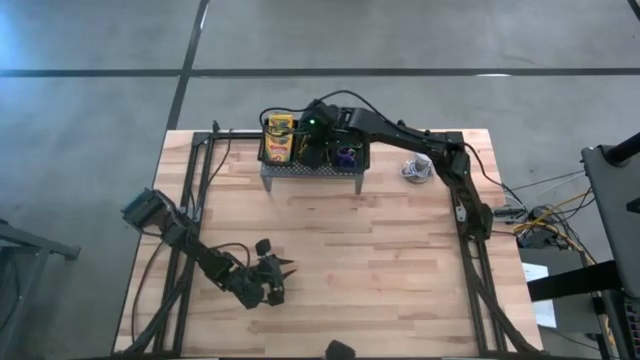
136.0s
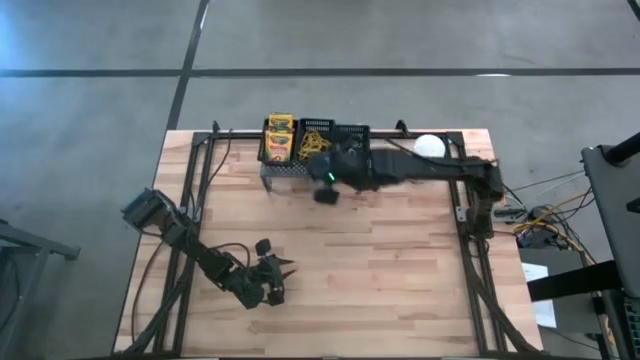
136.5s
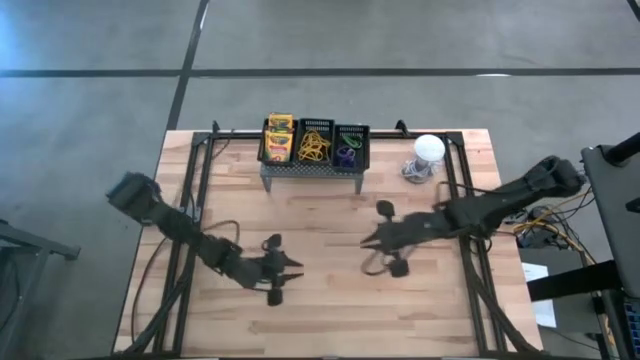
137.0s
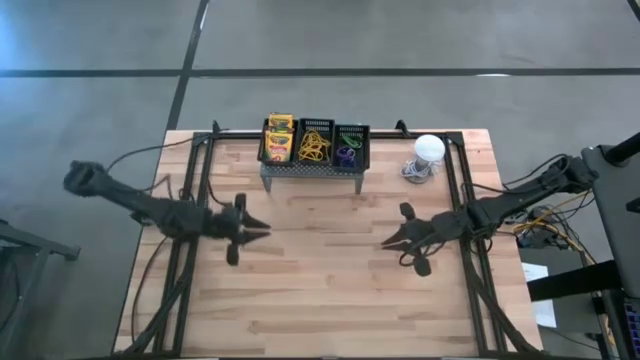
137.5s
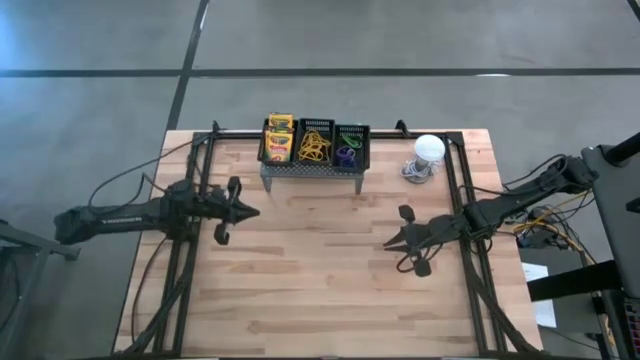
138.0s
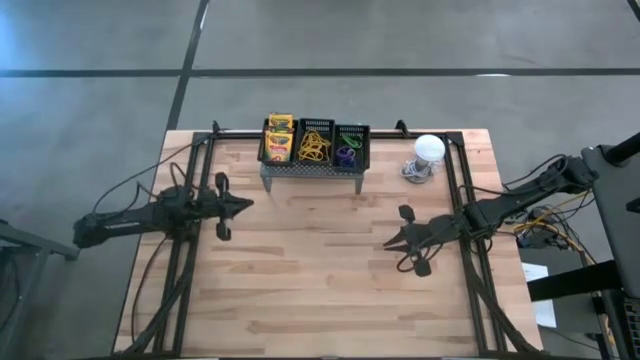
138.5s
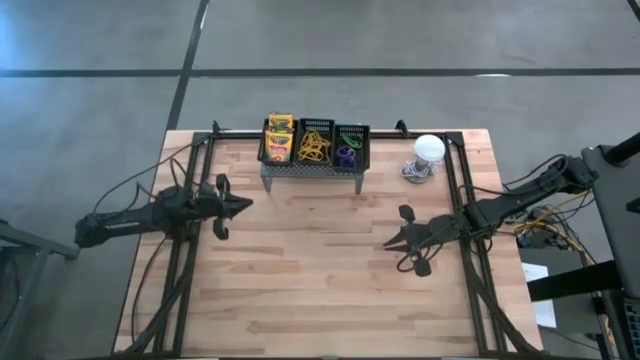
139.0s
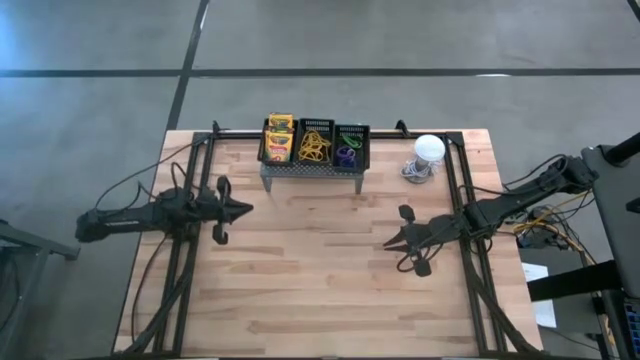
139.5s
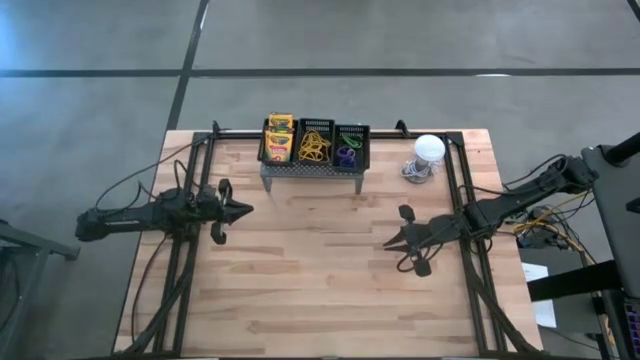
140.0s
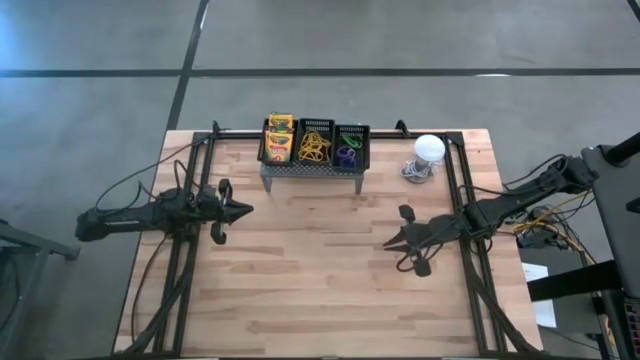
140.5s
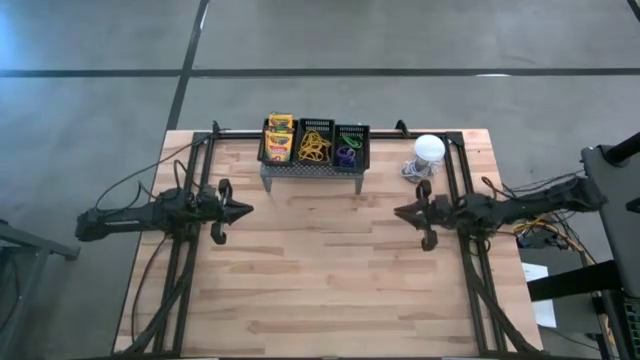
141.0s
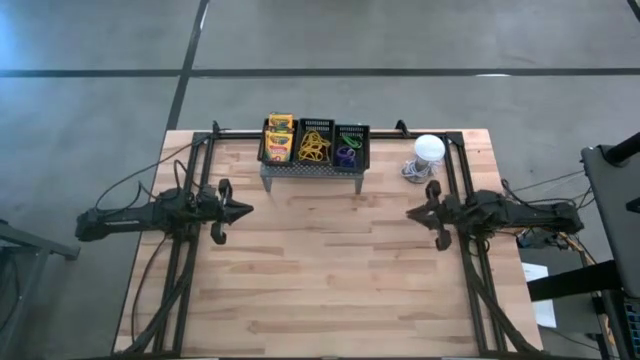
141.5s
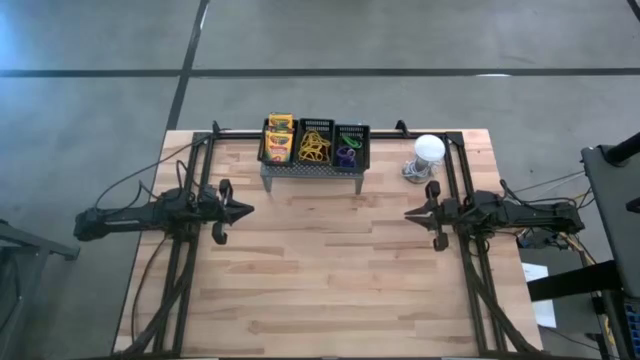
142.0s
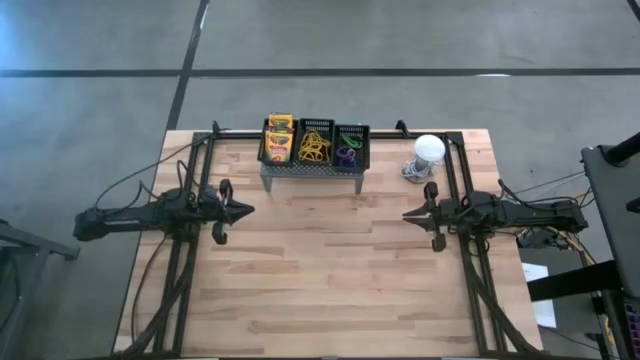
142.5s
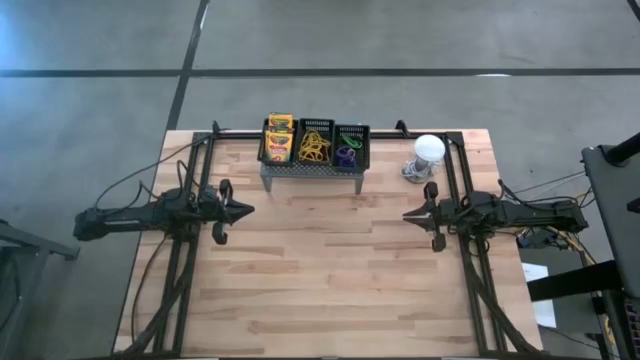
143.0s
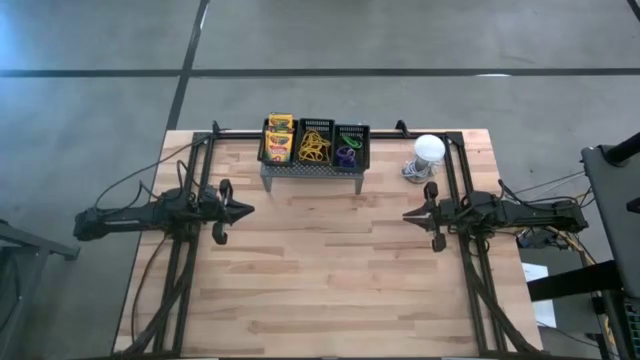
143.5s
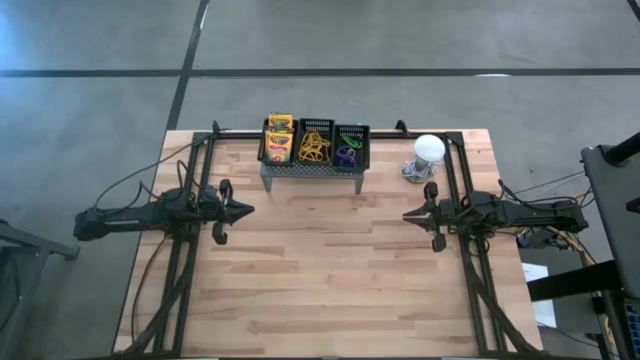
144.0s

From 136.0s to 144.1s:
Task: Pick & Place Office Desk Supplies
Return to Home Position

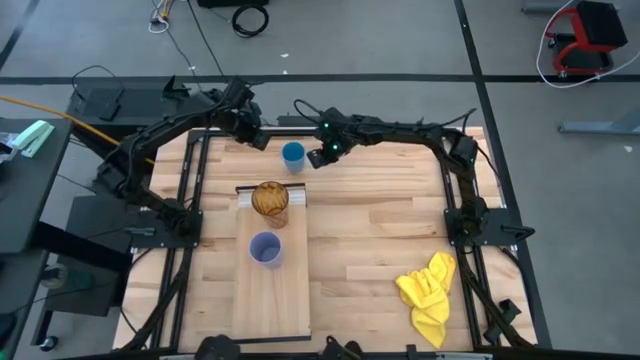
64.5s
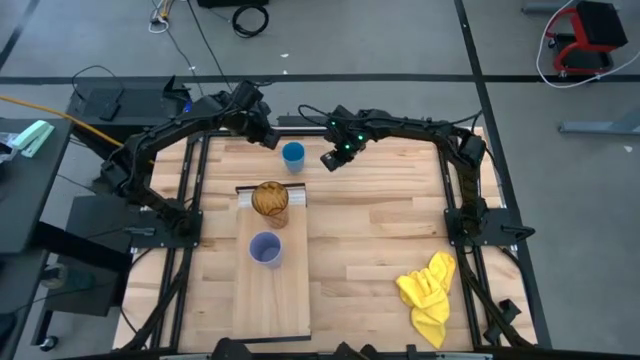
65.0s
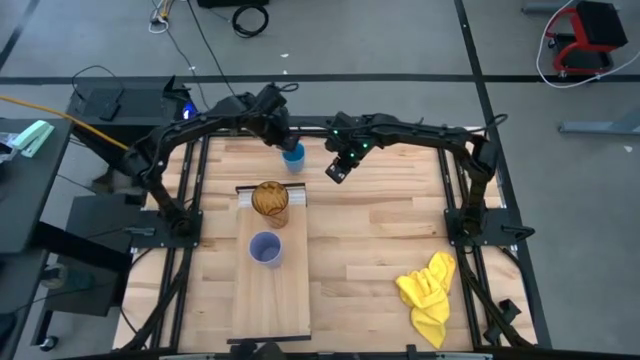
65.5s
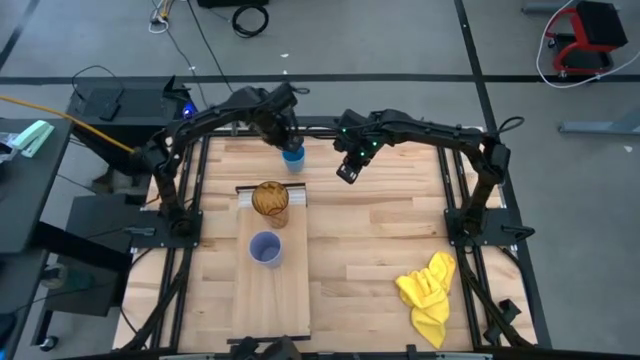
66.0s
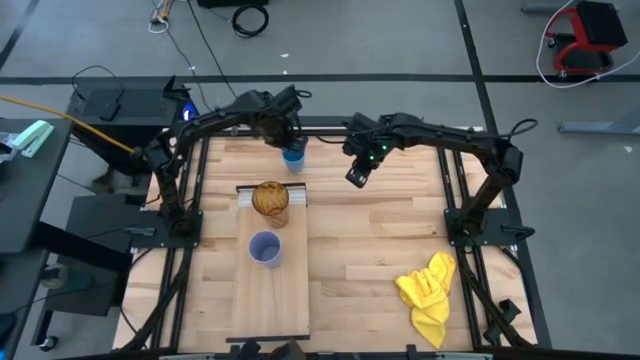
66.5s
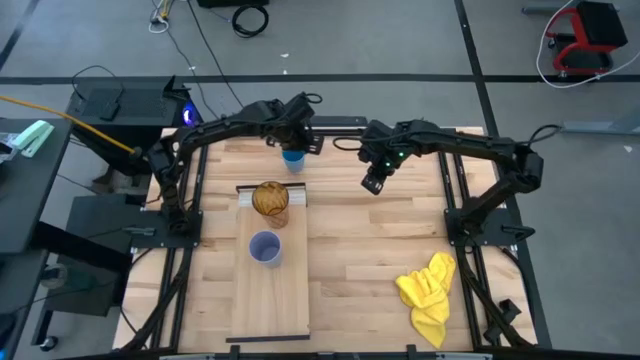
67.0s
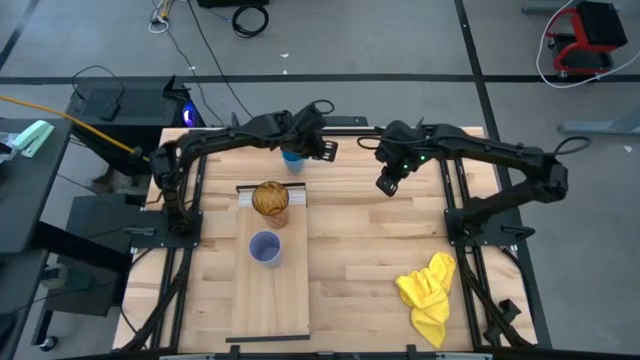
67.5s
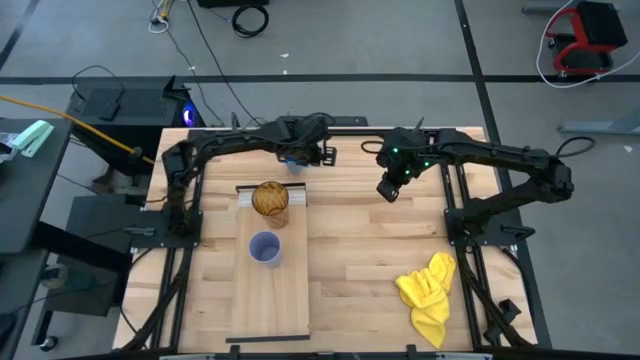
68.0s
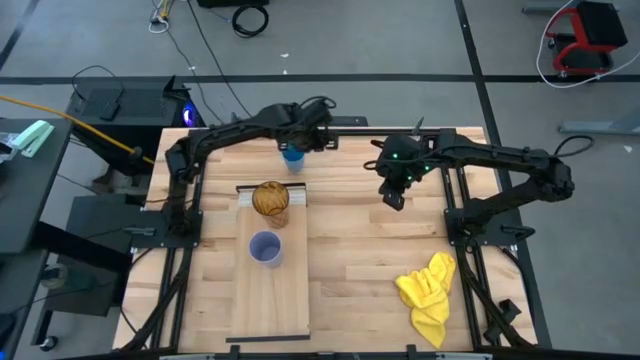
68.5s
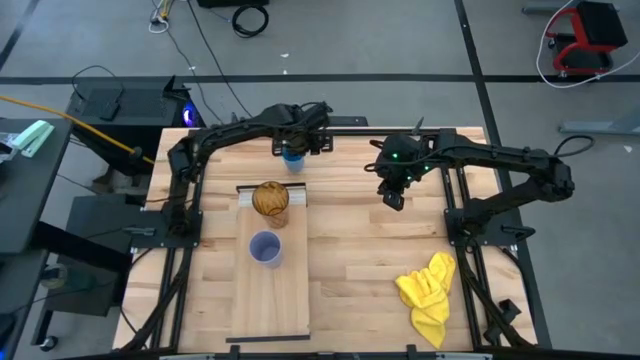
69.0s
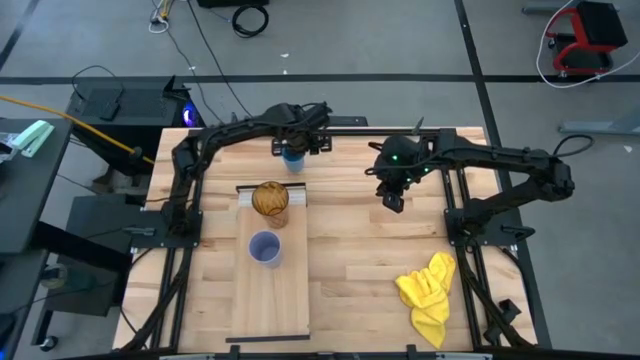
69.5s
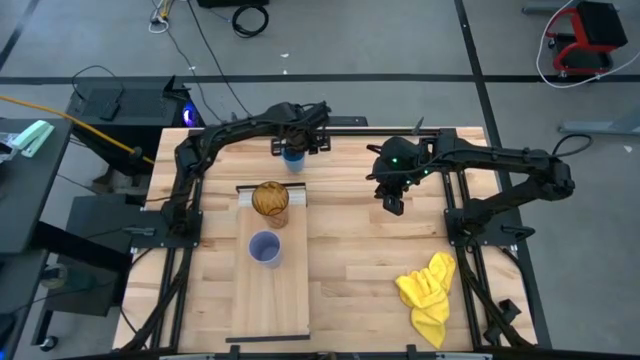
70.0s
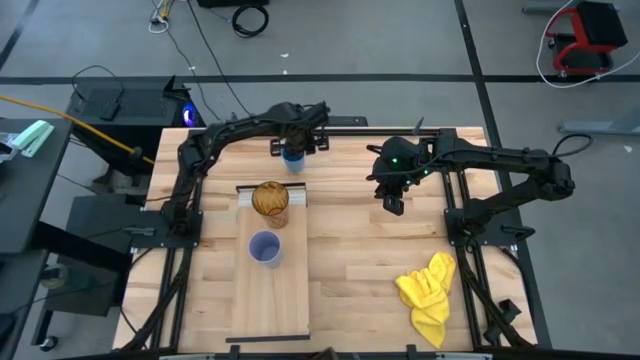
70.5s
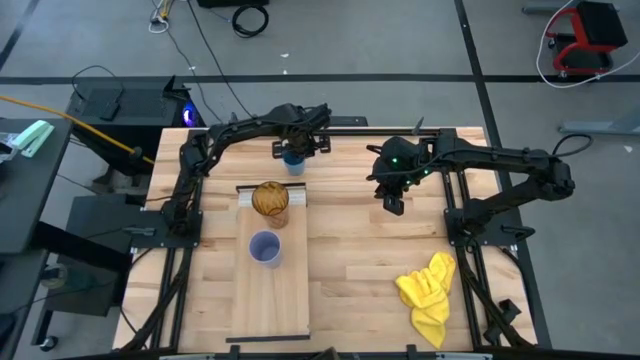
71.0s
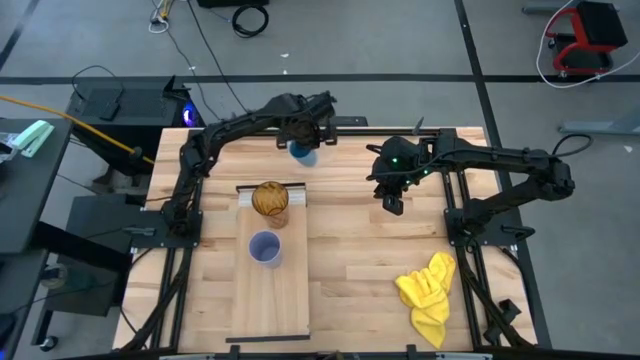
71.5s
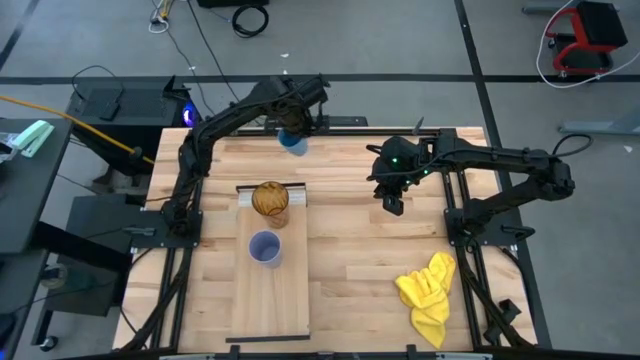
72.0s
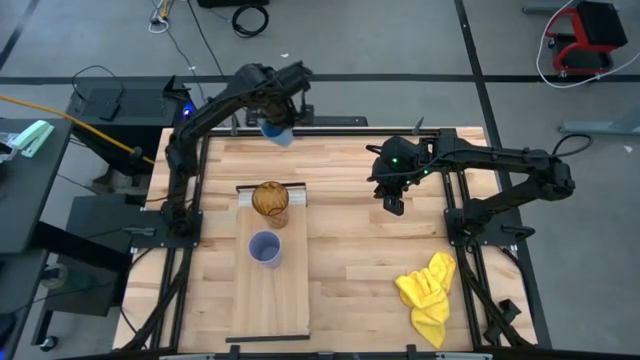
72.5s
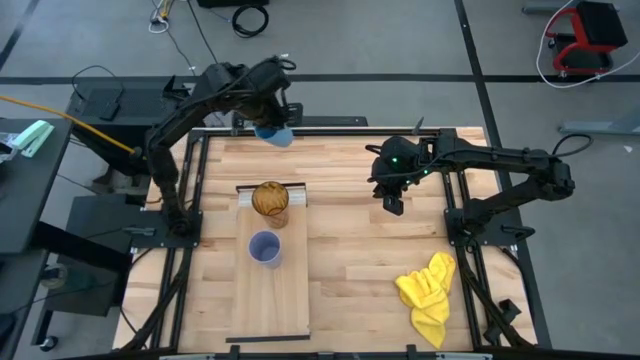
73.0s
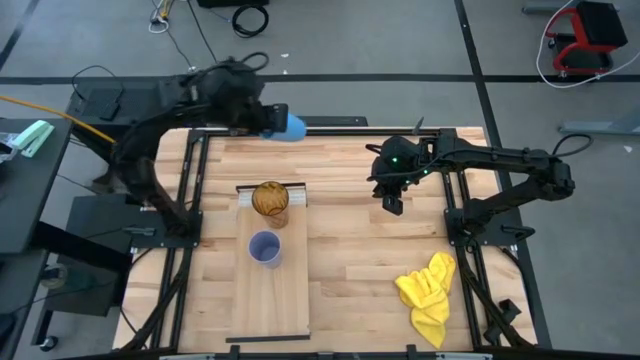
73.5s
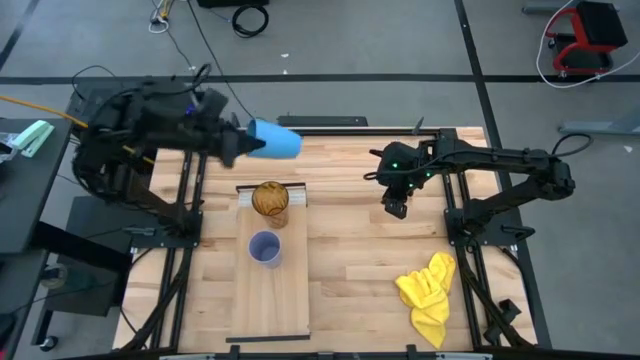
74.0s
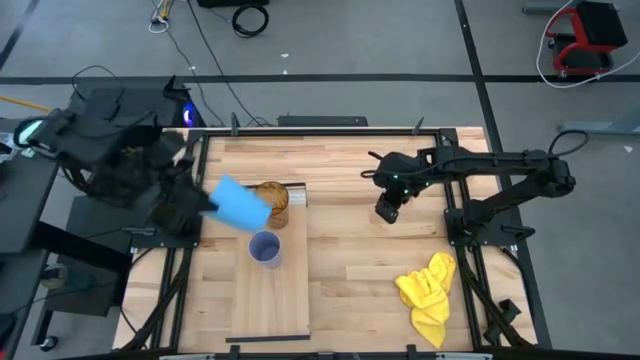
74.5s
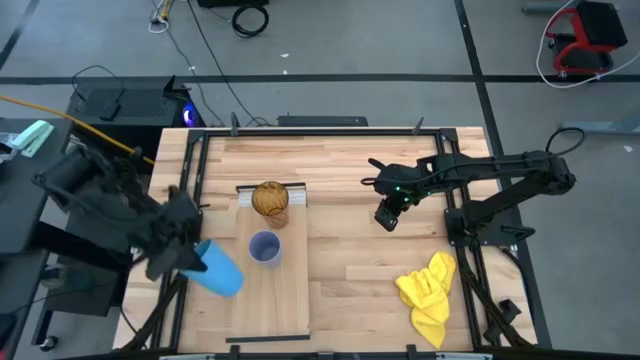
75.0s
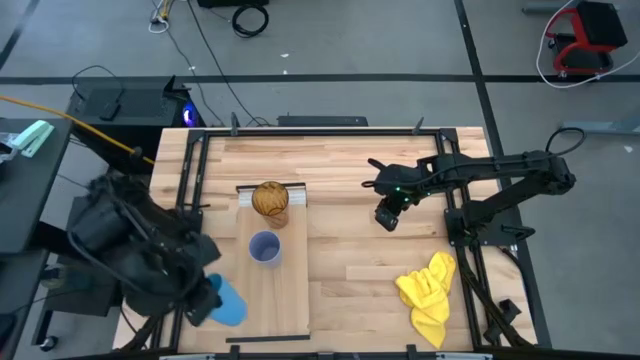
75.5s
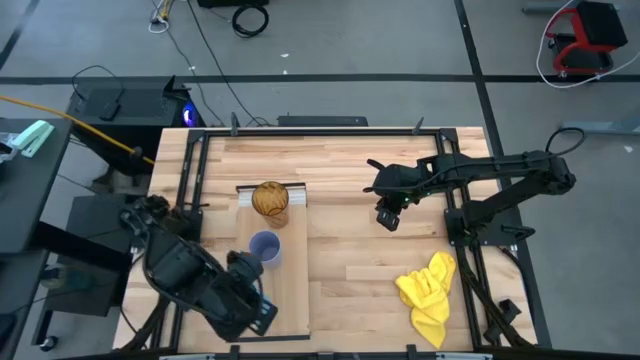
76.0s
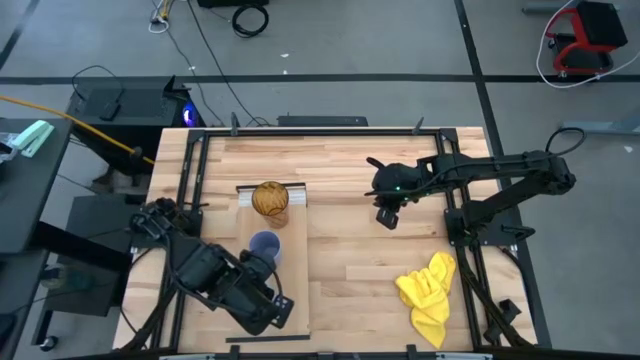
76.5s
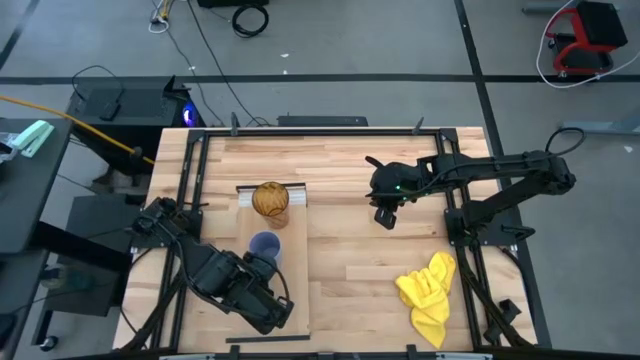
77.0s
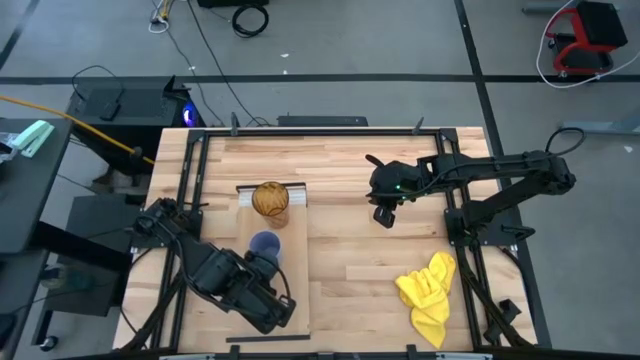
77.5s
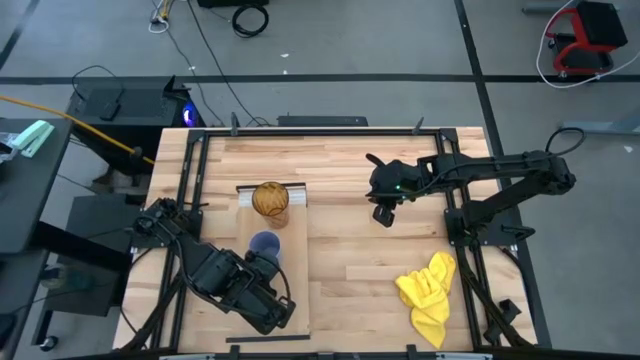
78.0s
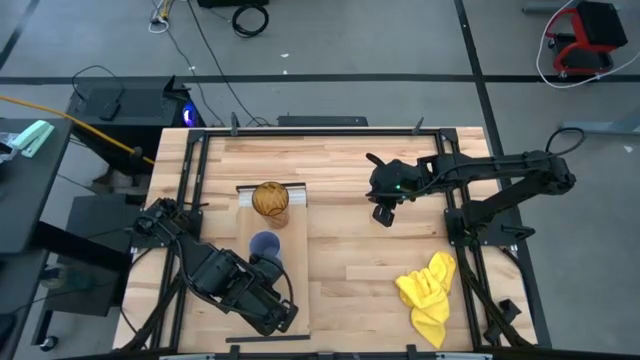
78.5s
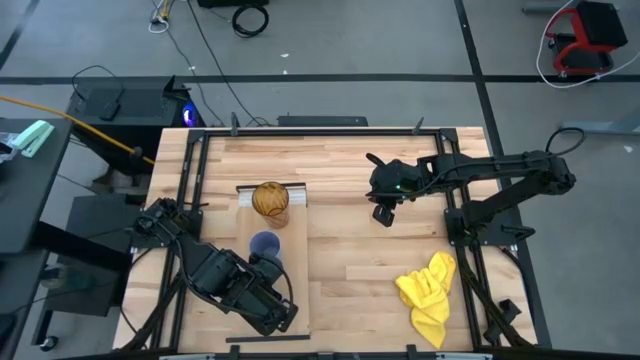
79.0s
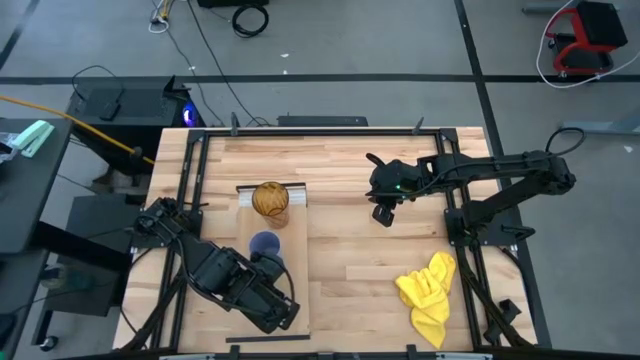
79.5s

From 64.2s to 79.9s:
Task: Stack small to large cups/mugs on shelf
Put the light blue cup on the shelf
